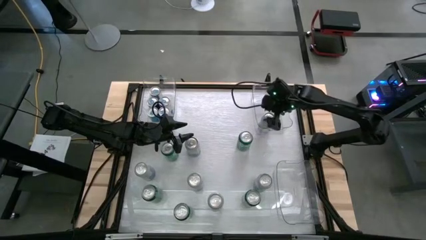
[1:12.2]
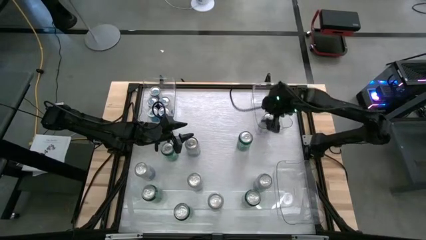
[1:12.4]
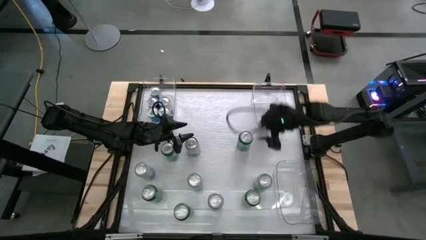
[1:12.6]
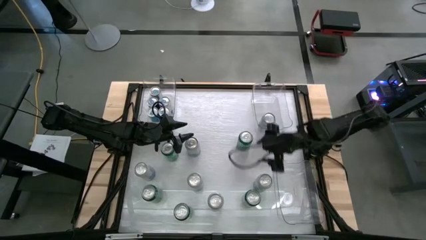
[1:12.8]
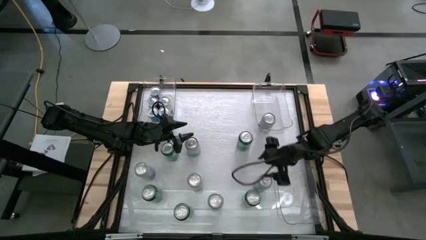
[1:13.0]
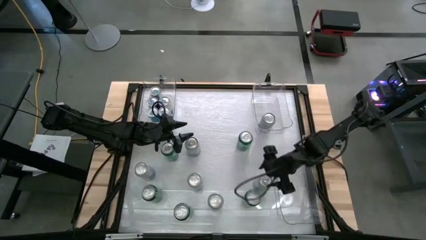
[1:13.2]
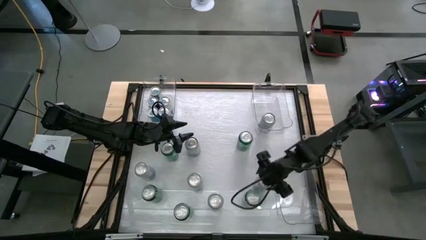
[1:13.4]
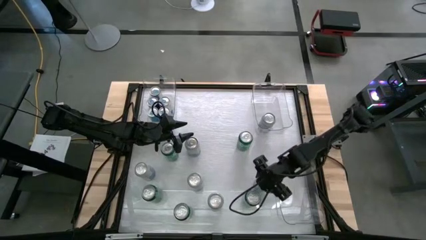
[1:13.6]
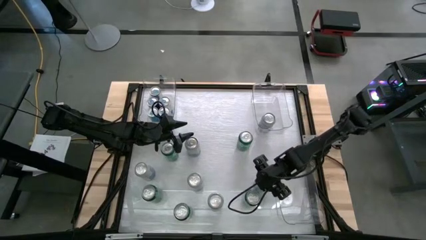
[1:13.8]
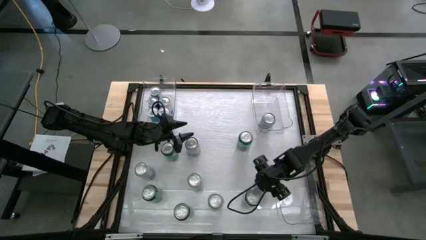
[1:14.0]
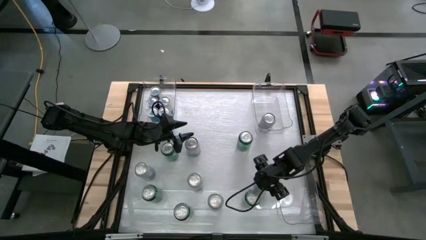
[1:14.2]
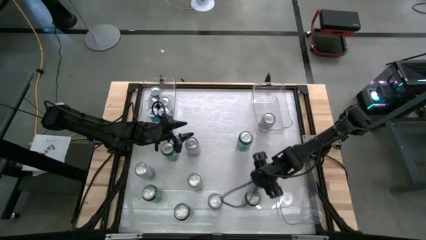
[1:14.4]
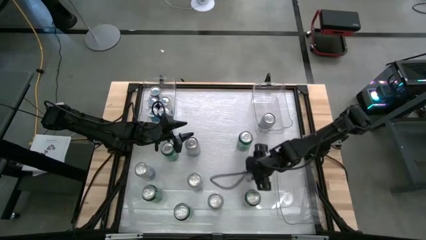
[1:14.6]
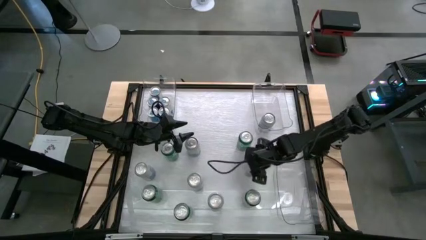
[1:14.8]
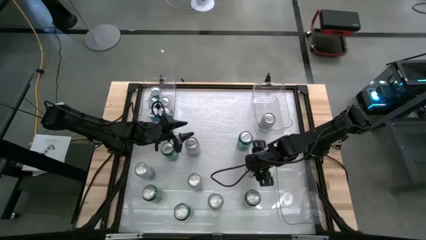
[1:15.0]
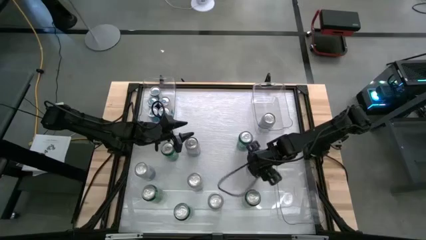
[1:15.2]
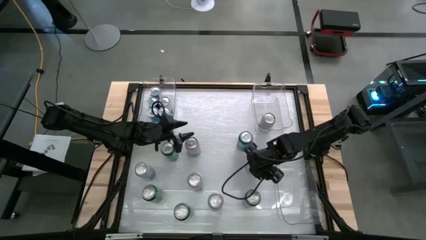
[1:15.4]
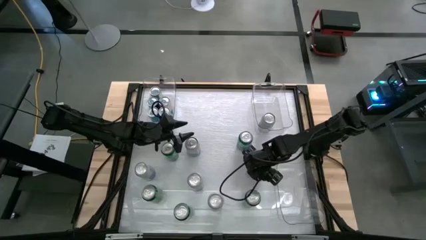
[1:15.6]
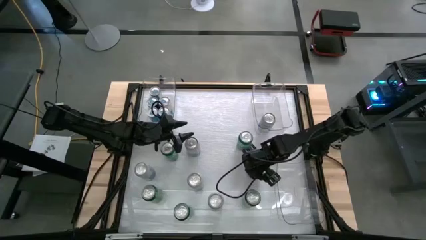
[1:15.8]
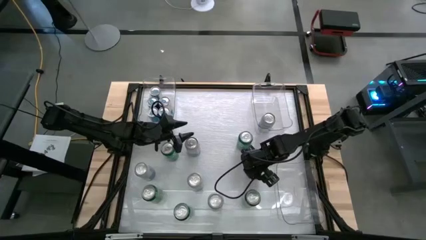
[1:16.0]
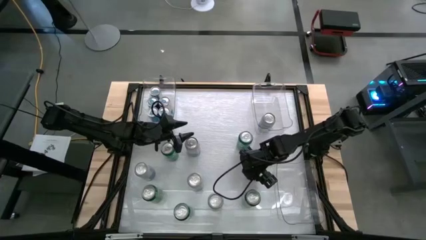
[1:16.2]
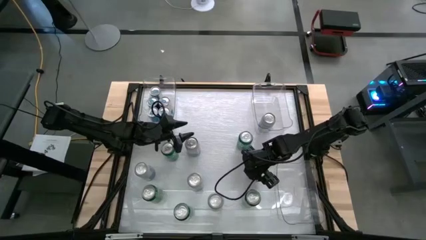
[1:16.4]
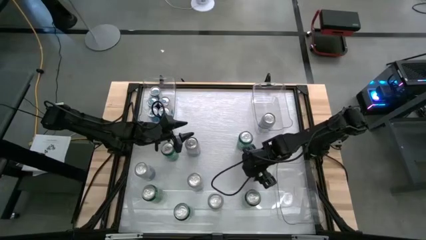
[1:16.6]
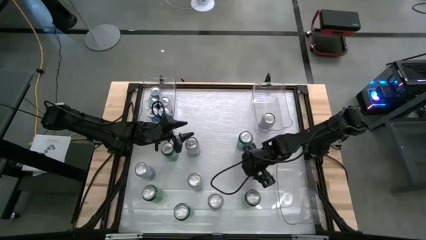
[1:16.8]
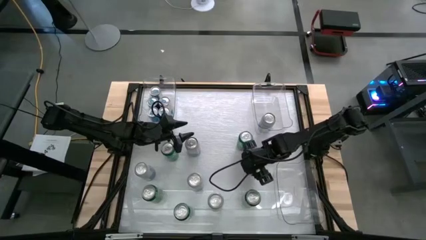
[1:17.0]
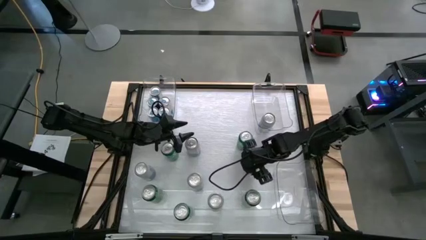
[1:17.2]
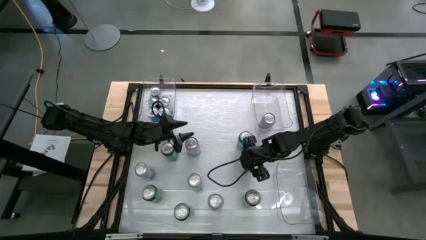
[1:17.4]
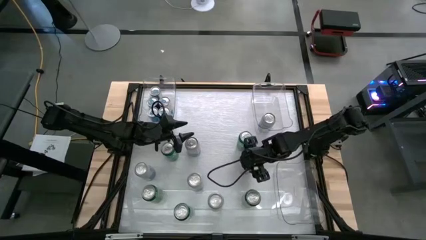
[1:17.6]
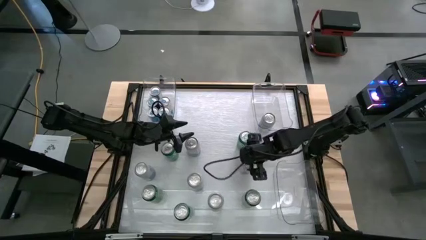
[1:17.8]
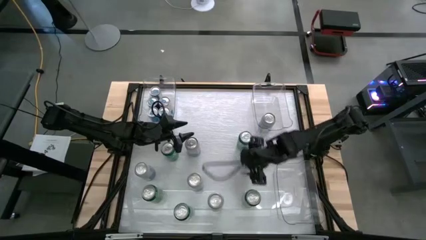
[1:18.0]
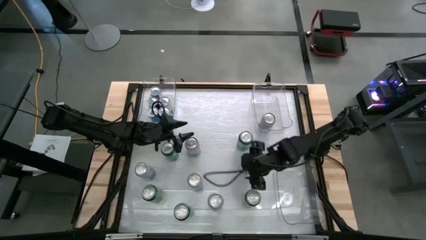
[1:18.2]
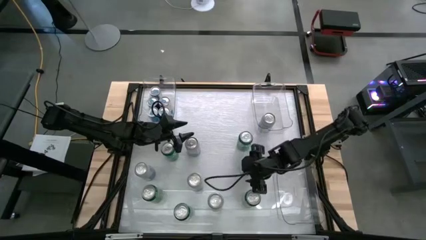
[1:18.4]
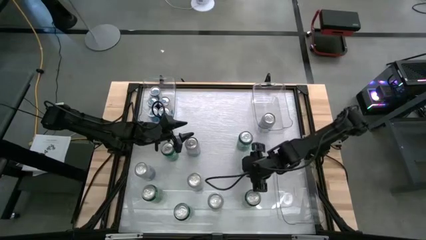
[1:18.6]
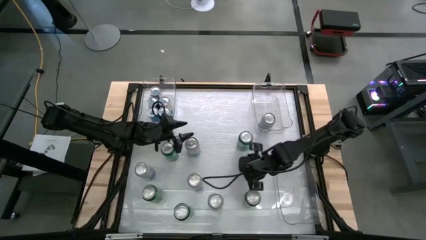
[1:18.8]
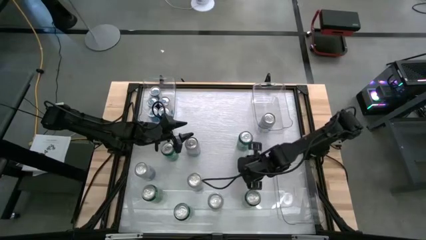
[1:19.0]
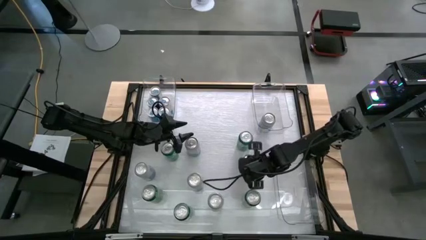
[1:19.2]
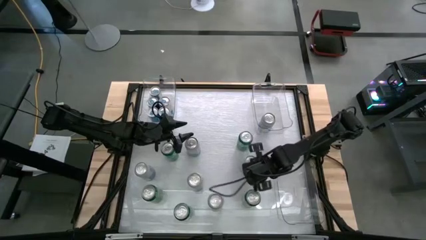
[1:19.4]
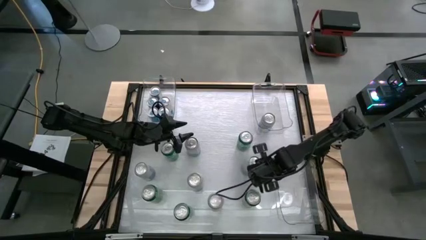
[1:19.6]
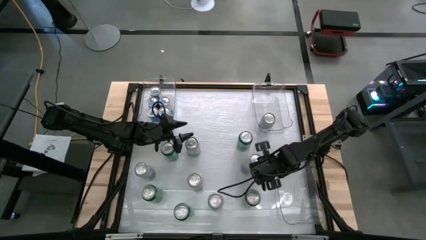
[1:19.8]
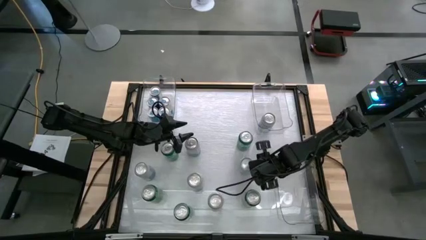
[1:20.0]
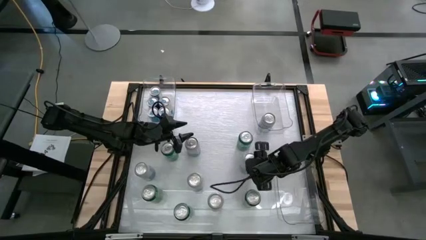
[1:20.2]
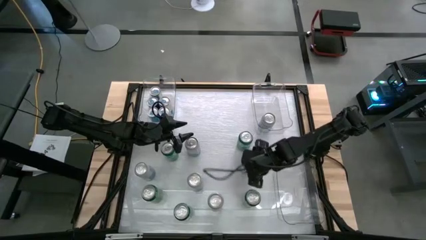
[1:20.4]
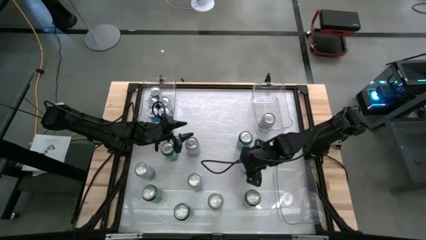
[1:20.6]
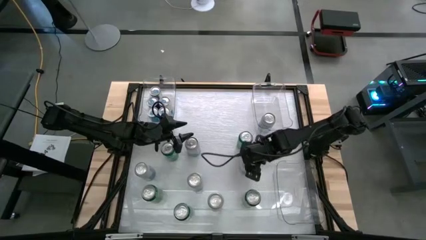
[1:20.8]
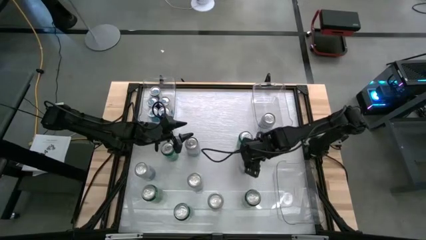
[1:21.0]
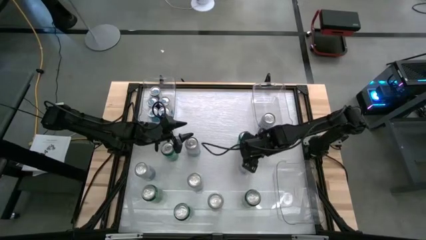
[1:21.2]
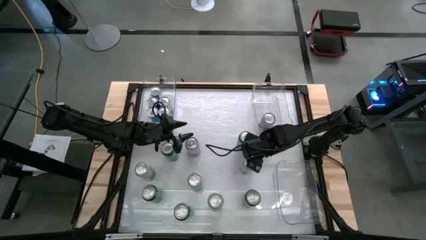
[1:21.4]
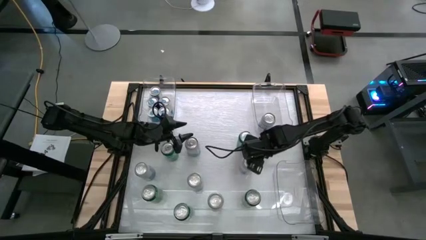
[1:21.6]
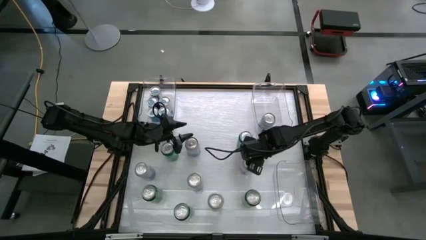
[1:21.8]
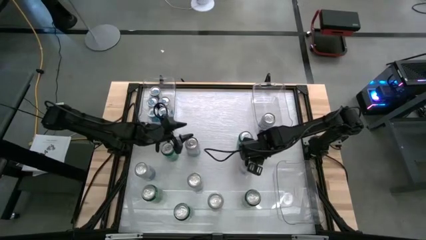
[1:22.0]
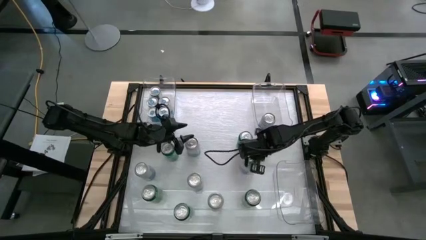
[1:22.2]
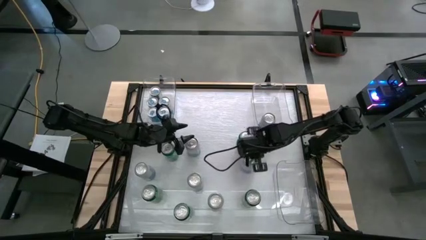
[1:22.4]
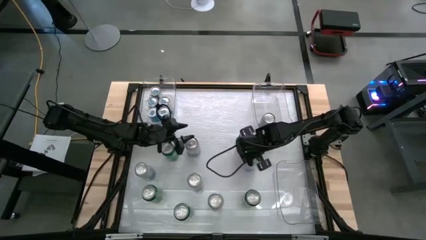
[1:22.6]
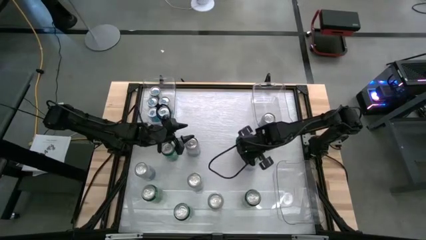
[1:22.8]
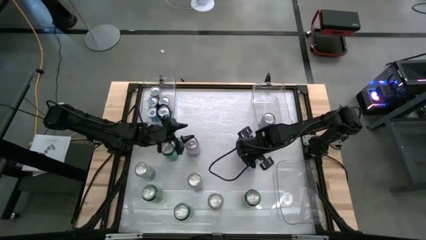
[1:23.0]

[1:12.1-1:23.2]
Task: Sort soda cans
Put the blue-white soda can into the top right transparent bin

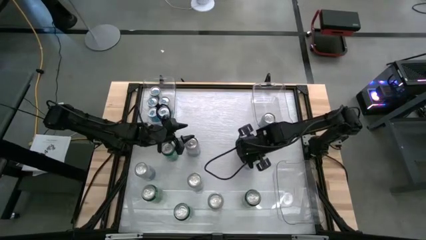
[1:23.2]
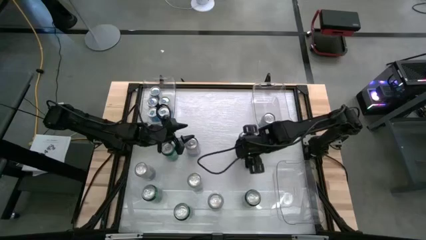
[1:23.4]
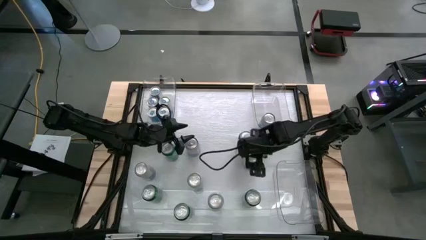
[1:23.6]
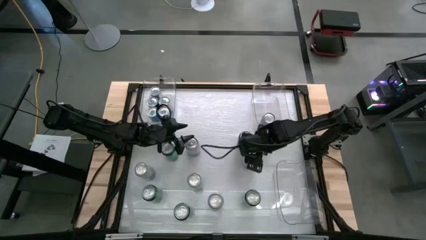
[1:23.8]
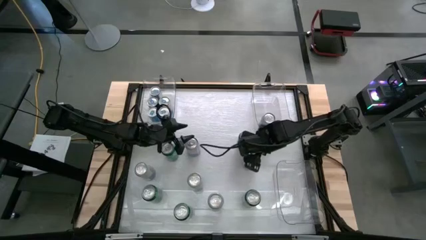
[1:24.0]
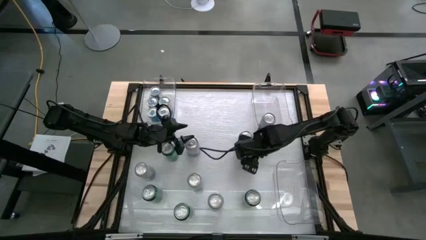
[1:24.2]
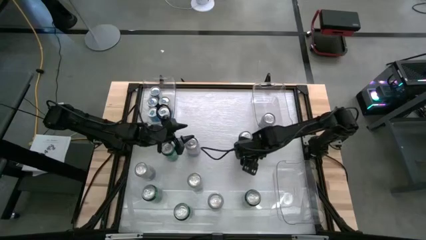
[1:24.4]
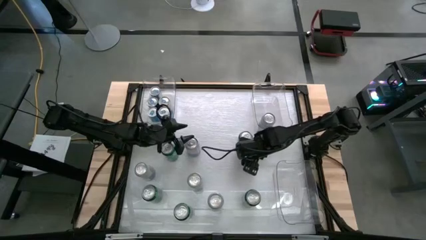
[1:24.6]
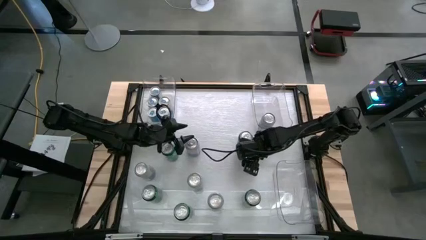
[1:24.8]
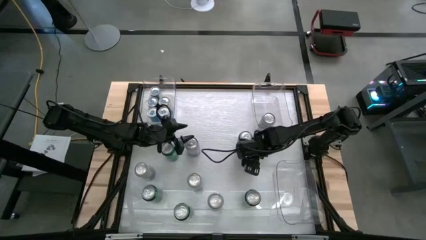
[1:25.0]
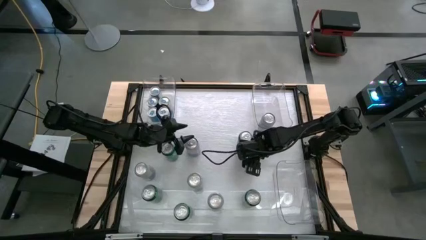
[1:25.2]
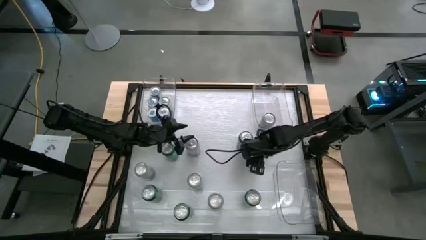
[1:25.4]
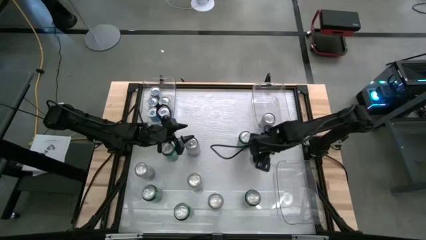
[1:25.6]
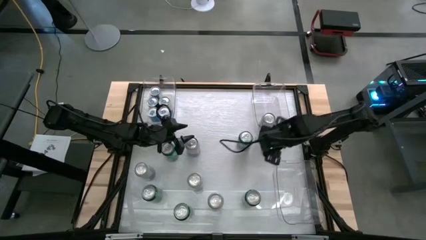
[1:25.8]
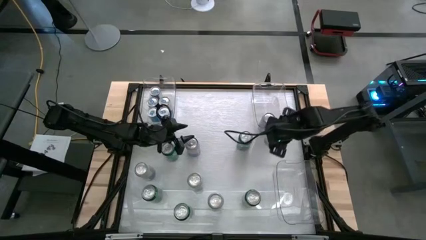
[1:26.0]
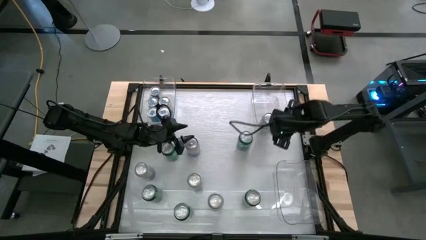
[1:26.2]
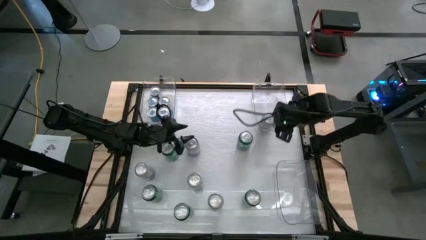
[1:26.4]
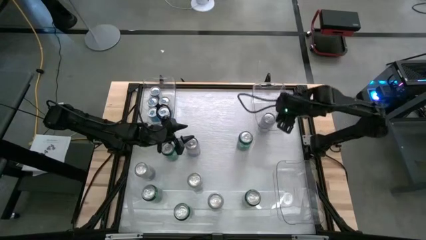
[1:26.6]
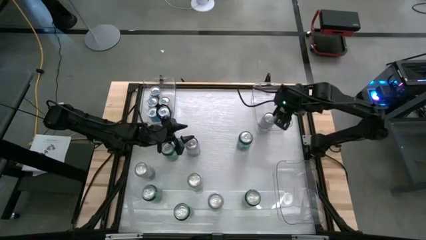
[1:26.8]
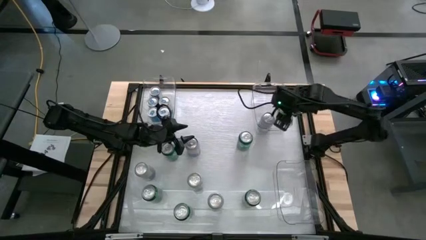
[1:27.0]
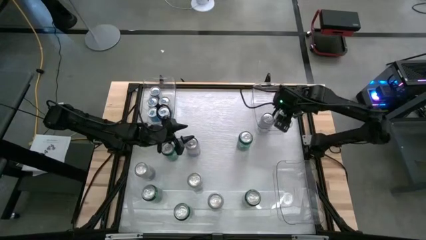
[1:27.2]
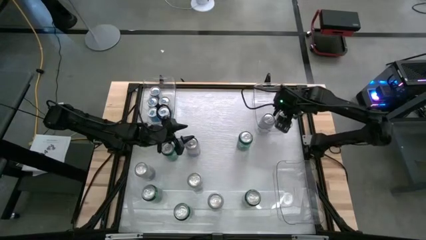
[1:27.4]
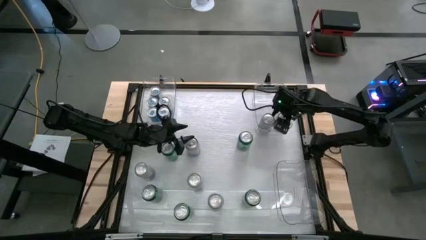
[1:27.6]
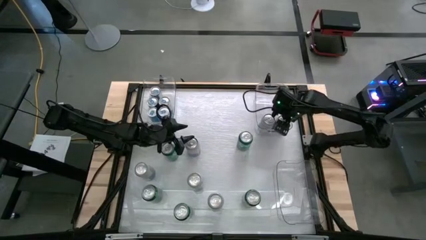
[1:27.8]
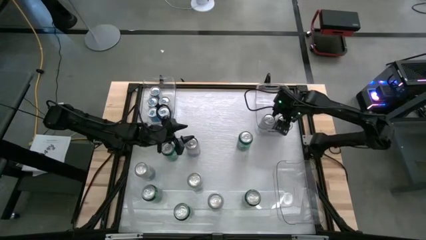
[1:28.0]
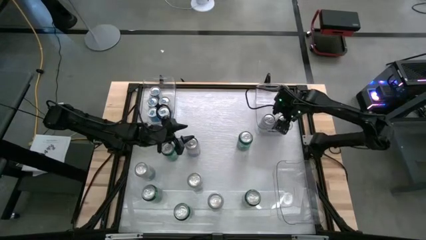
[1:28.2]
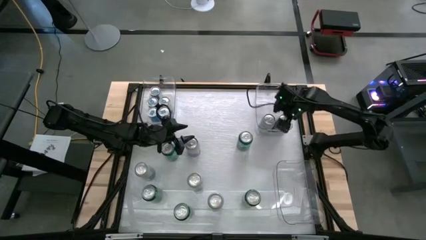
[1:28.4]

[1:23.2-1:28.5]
Put the blue-white soda can into the top right transparent bin
